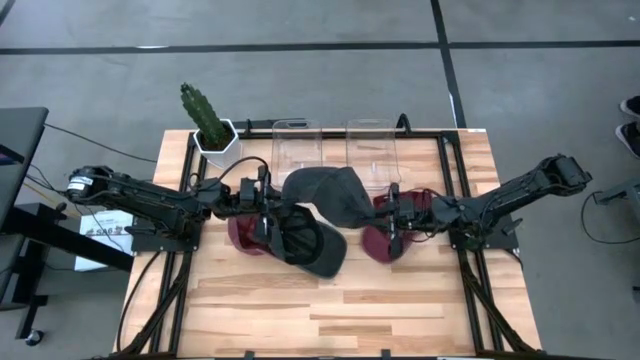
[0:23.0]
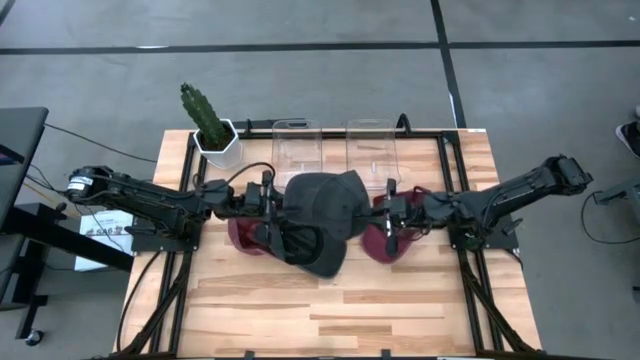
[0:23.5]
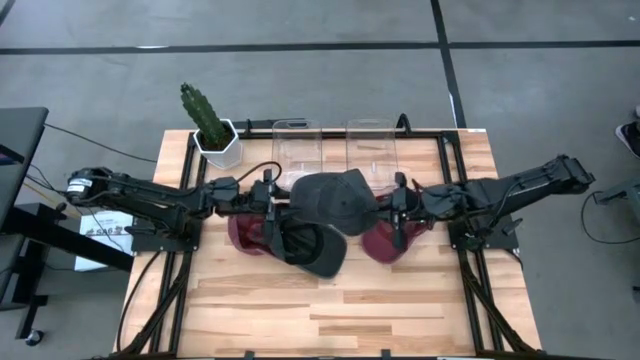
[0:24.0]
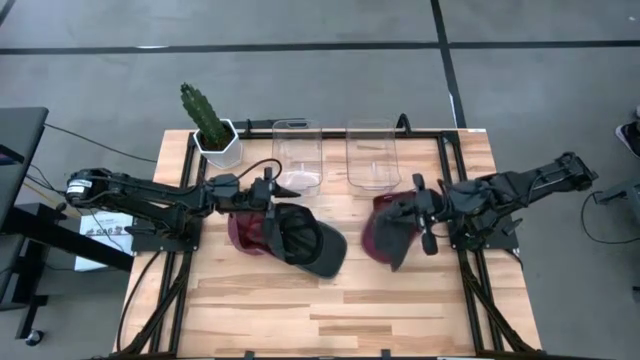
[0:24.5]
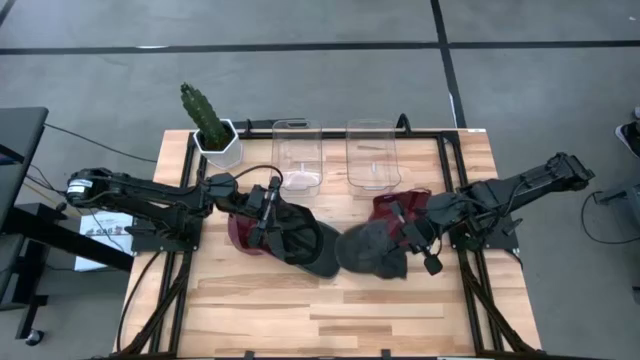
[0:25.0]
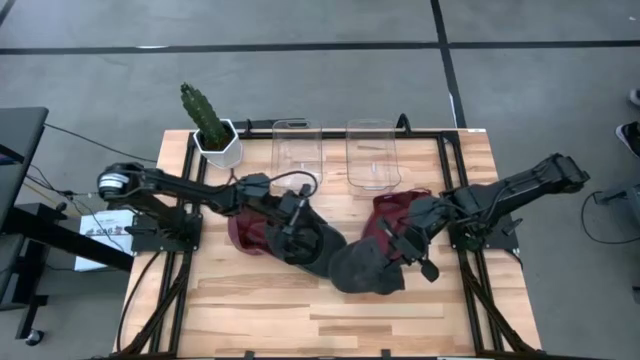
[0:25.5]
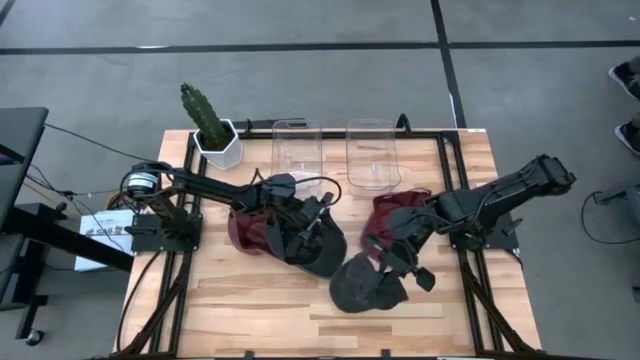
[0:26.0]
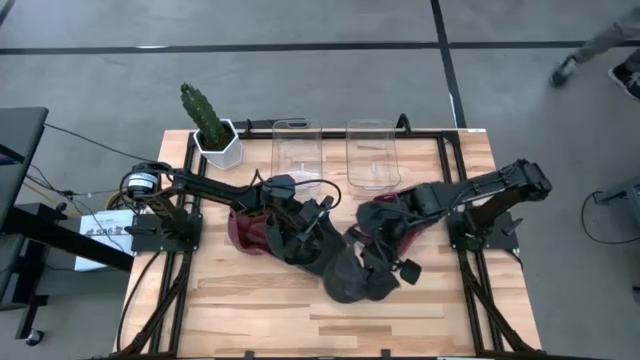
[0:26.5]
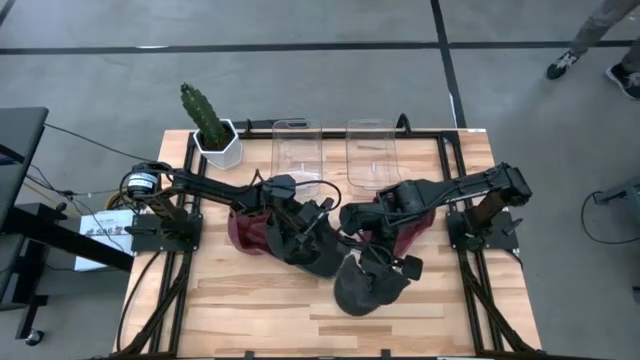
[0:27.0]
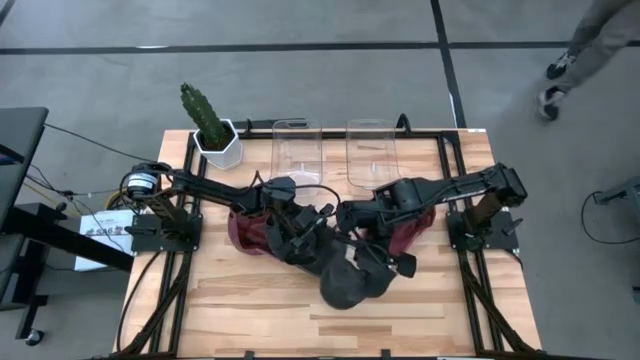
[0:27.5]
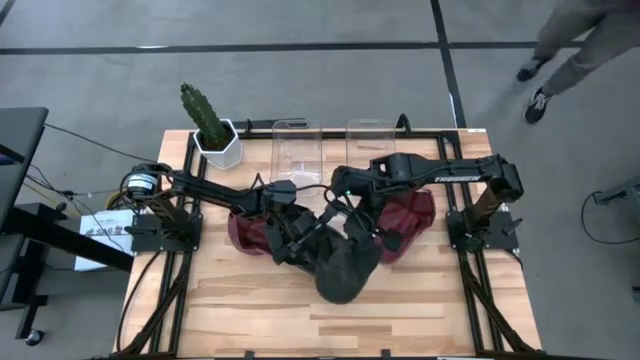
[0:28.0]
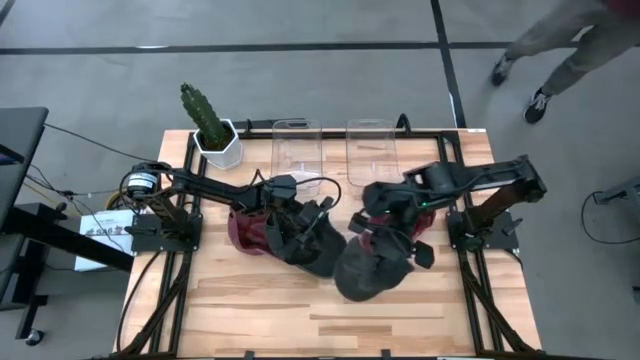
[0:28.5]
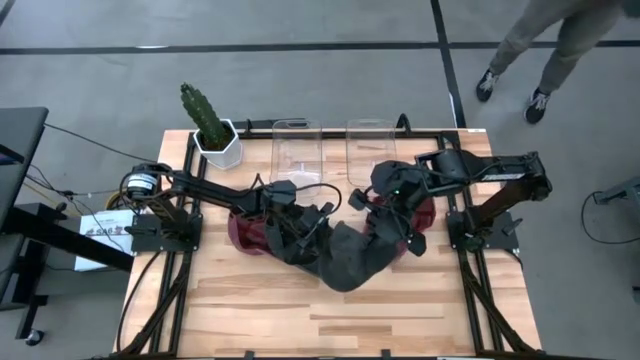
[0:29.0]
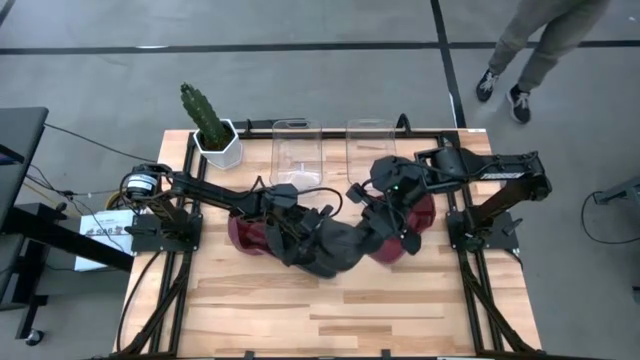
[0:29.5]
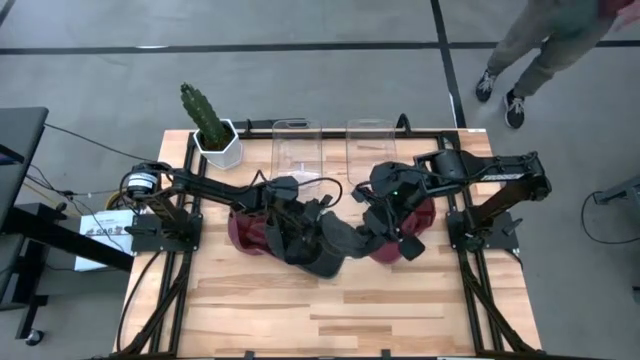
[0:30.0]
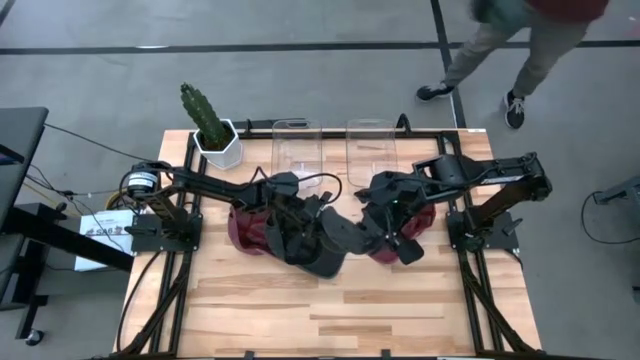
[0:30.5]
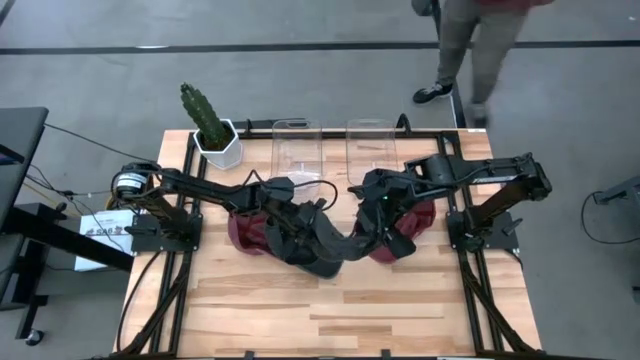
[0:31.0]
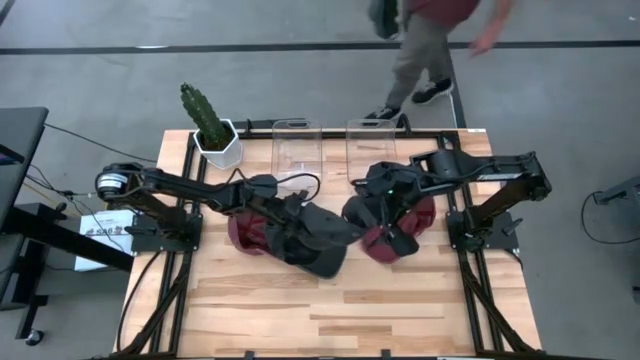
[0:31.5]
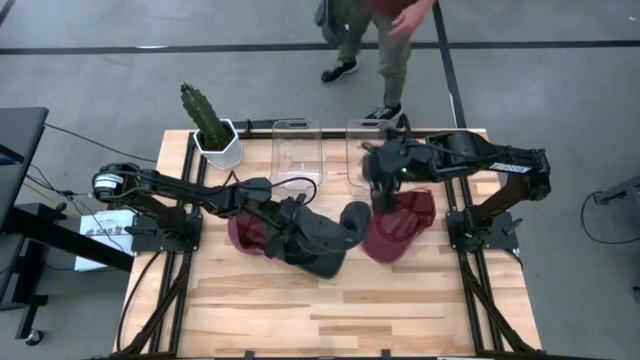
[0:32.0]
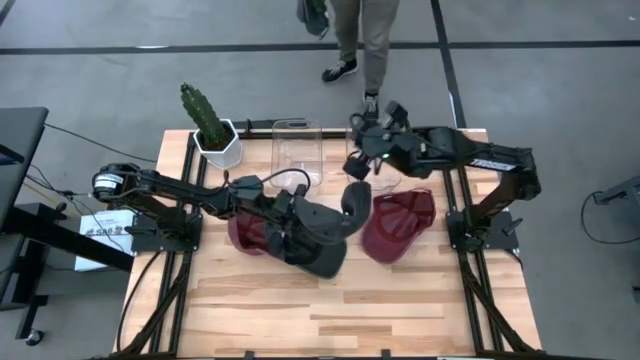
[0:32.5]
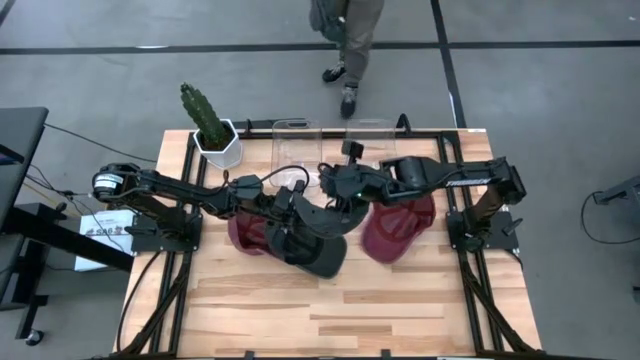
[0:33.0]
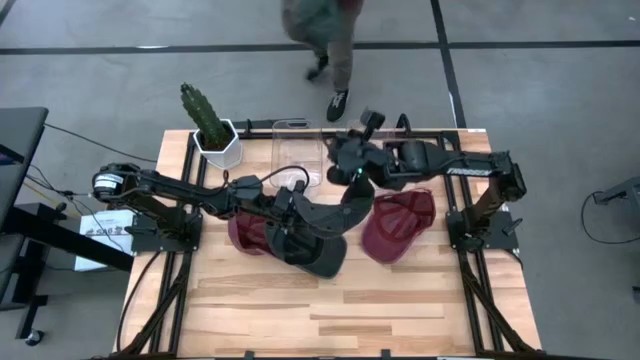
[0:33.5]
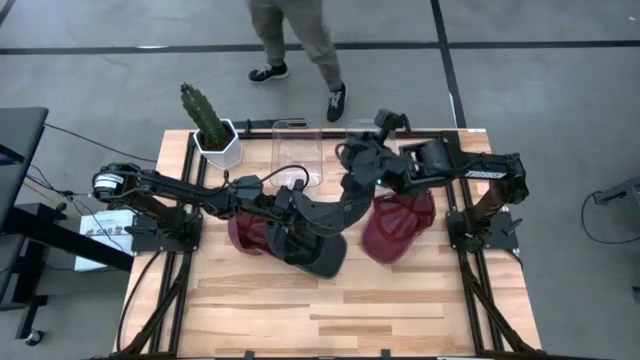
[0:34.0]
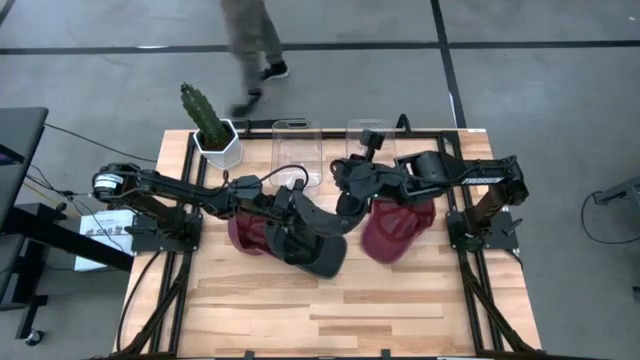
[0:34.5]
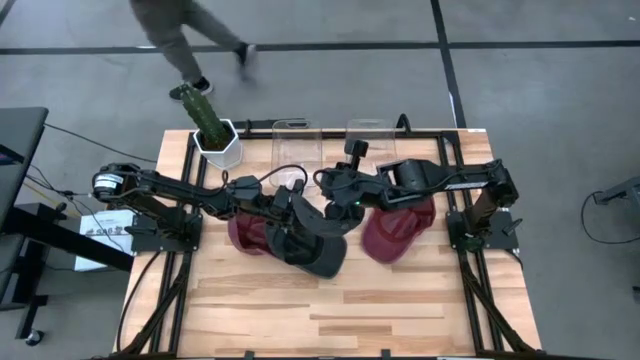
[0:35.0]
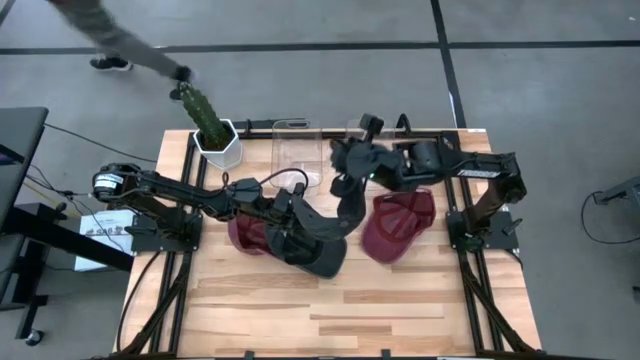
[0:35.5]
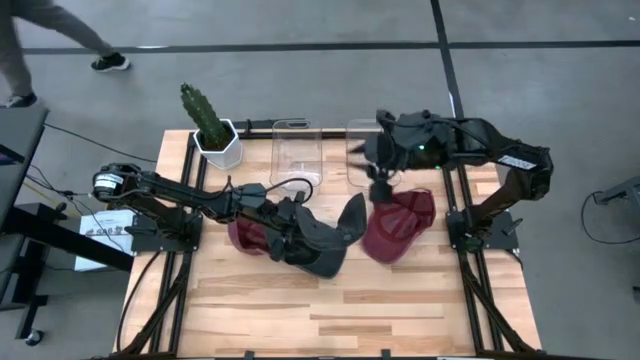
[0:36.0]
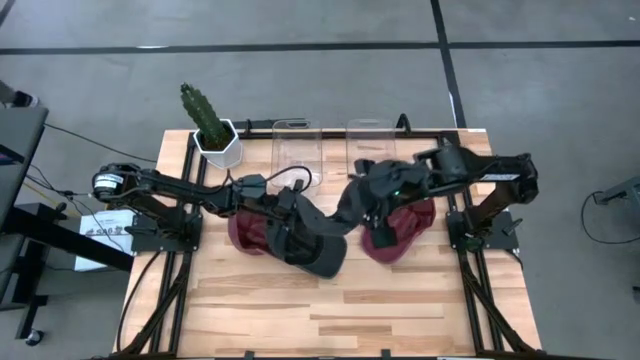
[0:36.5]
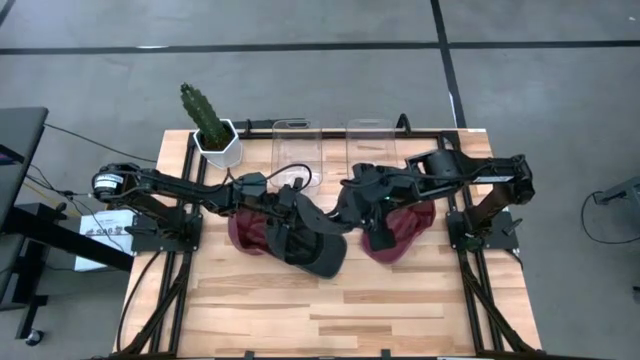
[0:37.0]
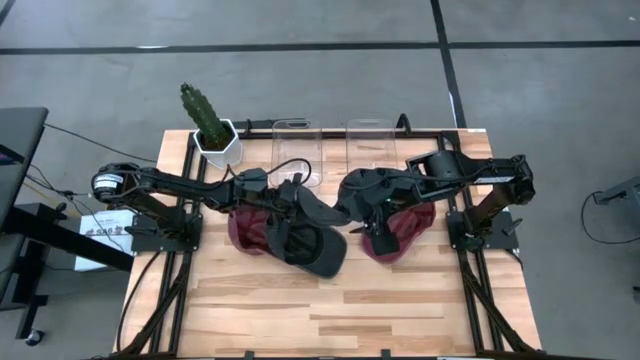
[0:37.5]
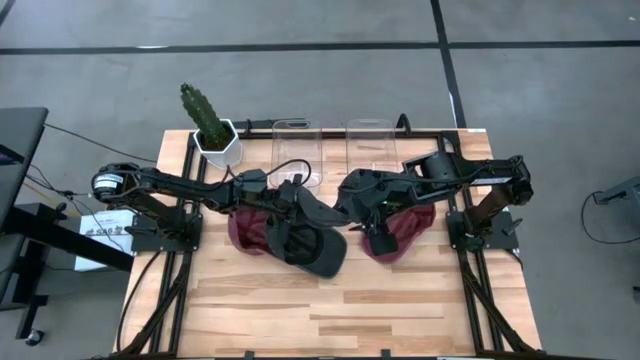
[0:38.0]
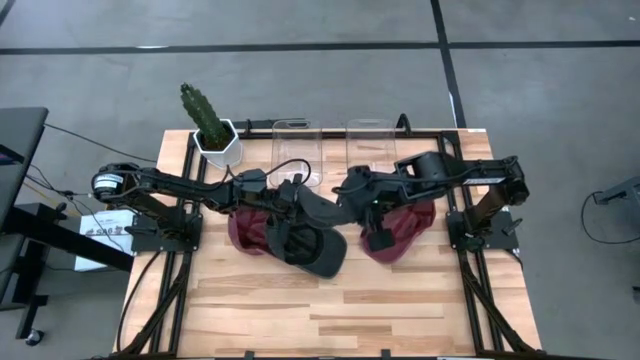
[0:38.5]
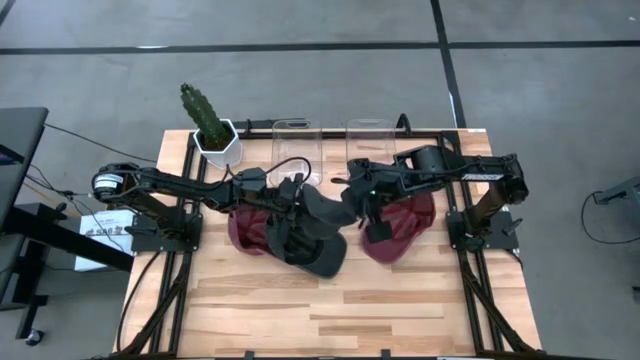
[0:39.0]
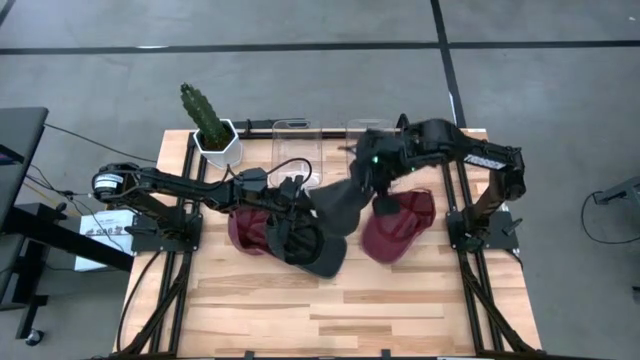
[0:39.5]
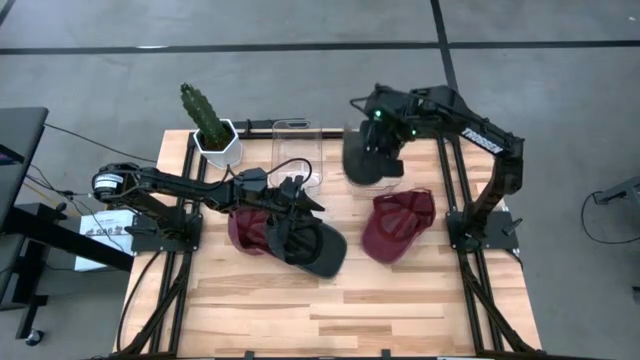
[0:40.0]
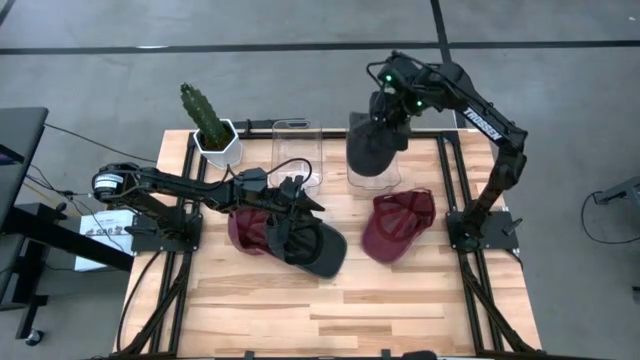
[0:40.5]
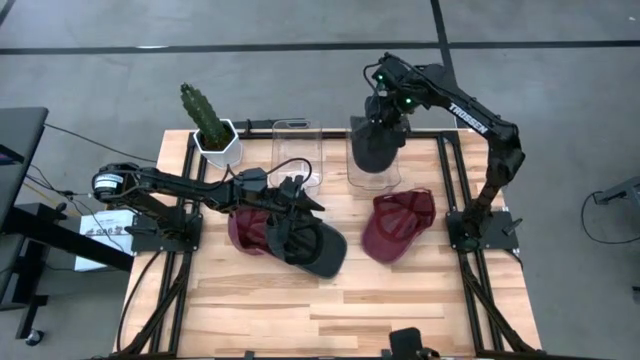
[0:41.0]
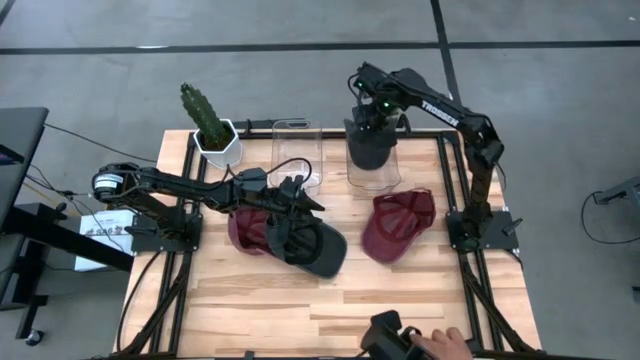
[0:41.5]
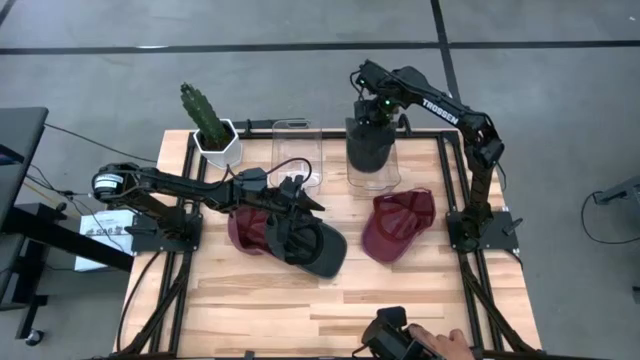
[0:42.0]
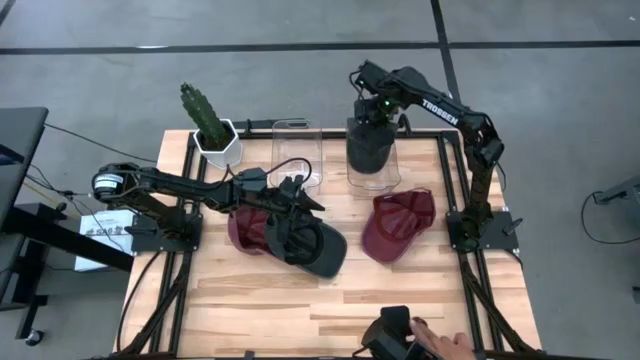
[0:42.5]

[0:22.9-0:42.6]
Task: Pick & Place hat
Put the right black cap into the transparent bin
